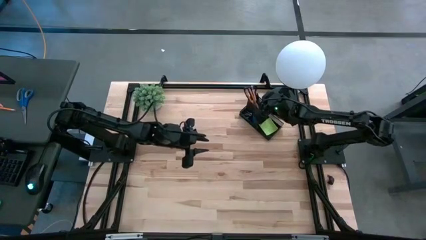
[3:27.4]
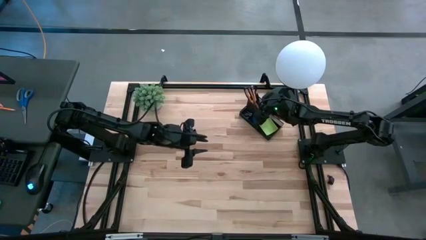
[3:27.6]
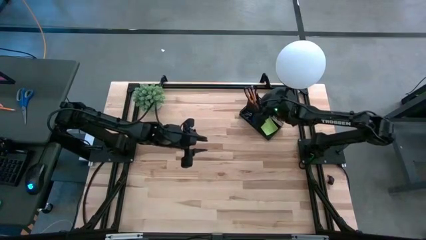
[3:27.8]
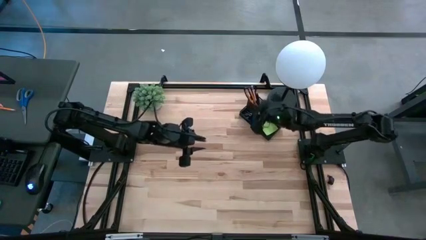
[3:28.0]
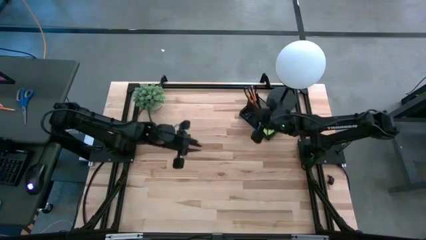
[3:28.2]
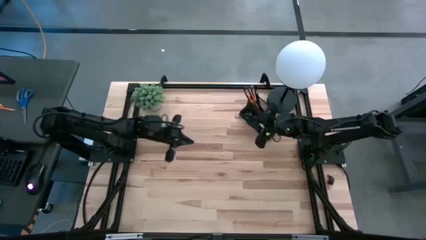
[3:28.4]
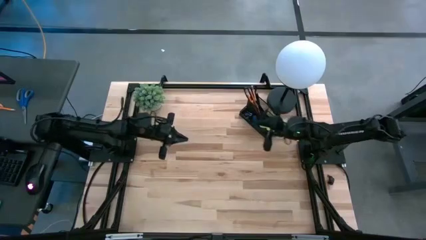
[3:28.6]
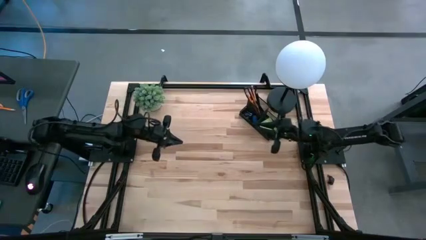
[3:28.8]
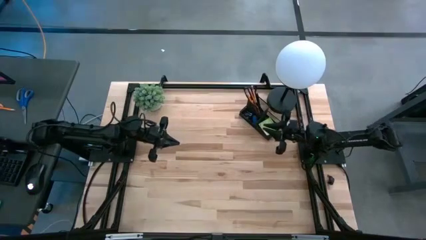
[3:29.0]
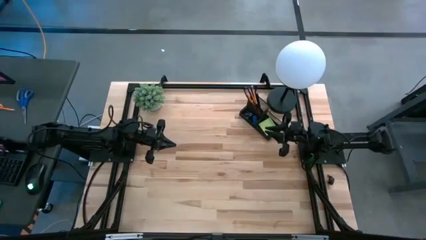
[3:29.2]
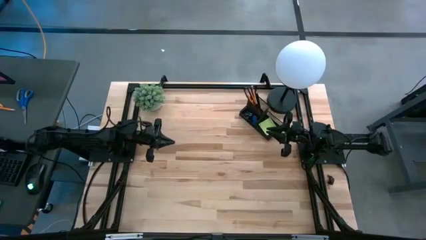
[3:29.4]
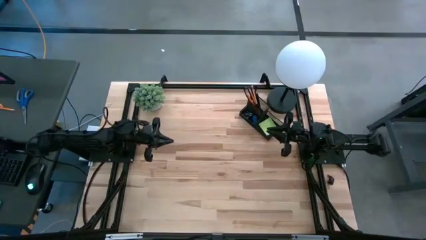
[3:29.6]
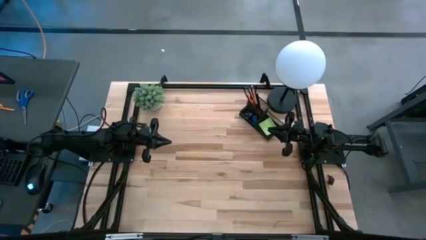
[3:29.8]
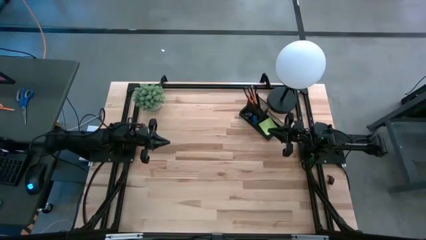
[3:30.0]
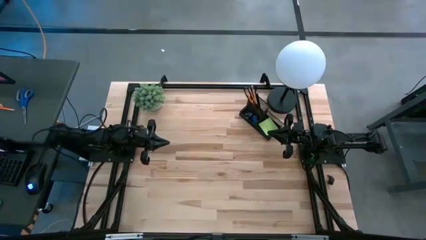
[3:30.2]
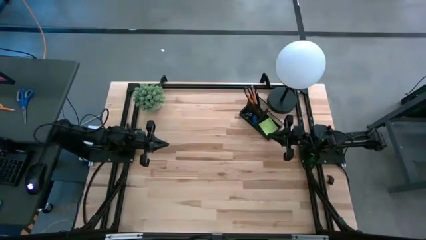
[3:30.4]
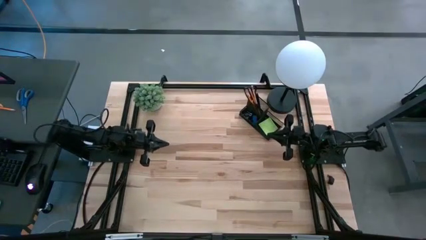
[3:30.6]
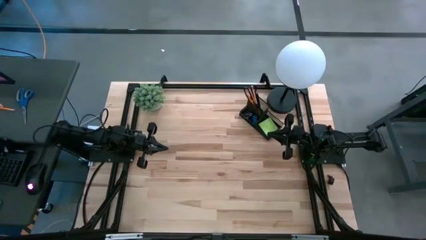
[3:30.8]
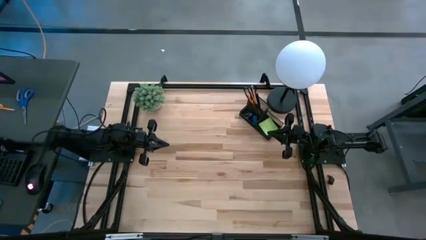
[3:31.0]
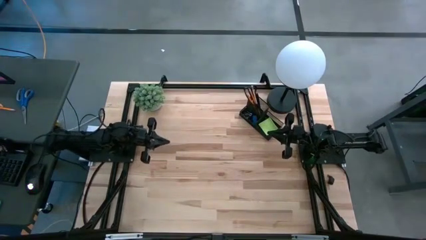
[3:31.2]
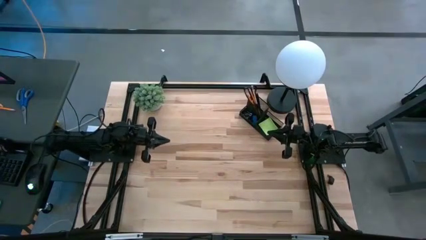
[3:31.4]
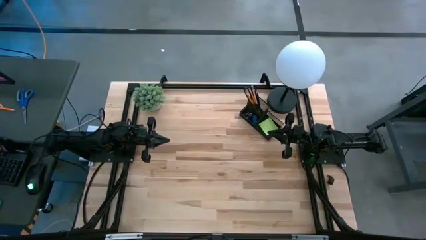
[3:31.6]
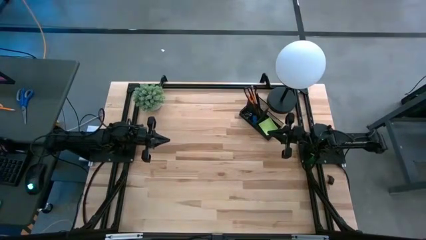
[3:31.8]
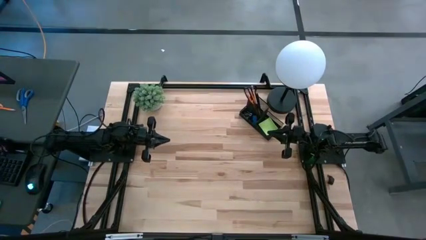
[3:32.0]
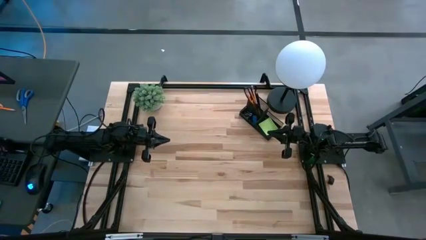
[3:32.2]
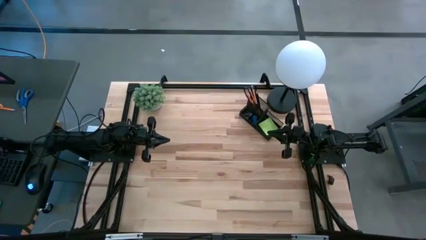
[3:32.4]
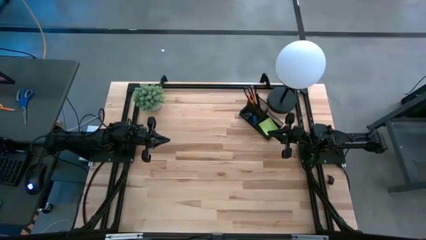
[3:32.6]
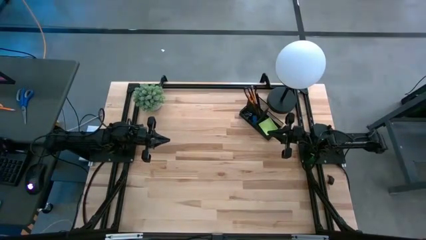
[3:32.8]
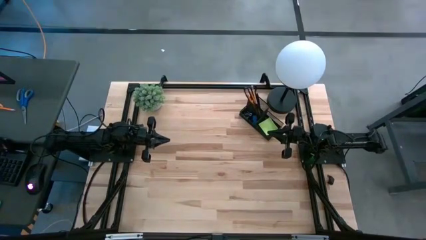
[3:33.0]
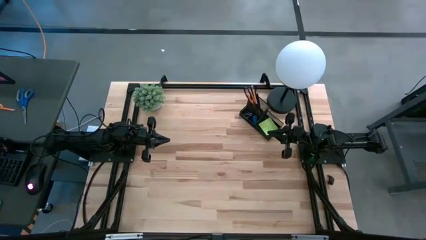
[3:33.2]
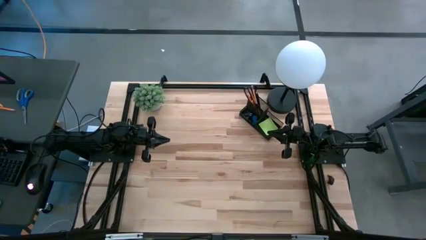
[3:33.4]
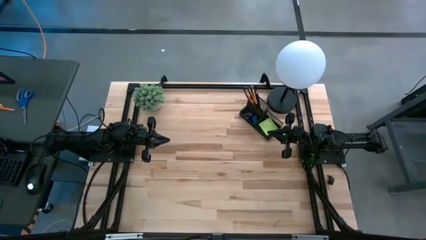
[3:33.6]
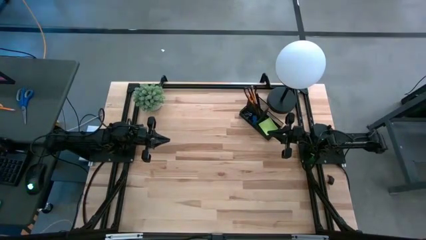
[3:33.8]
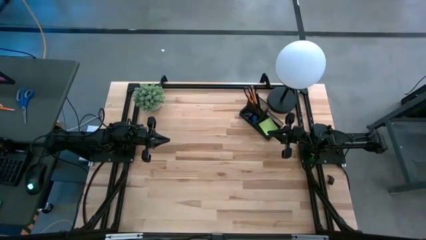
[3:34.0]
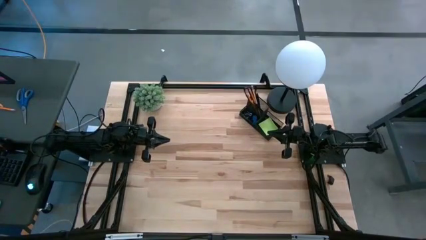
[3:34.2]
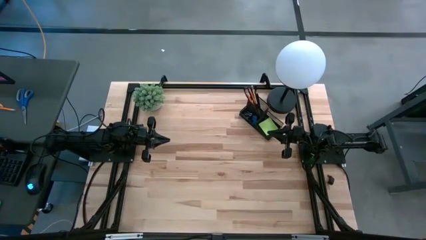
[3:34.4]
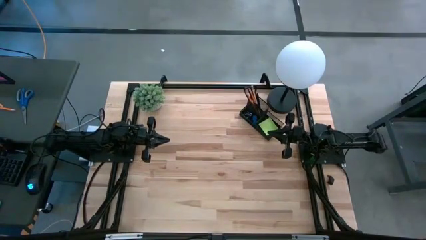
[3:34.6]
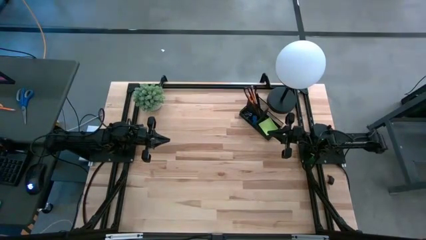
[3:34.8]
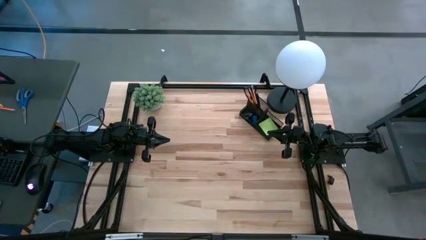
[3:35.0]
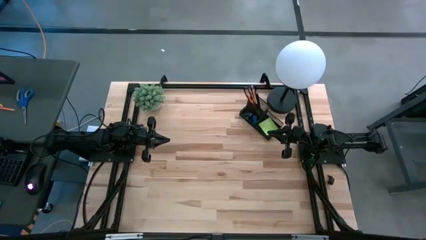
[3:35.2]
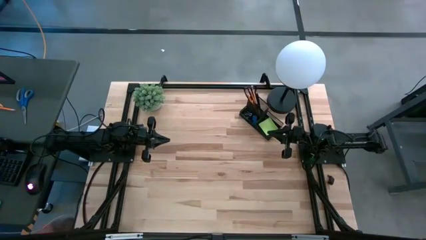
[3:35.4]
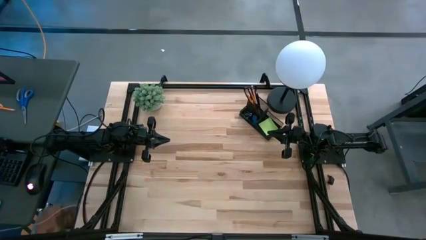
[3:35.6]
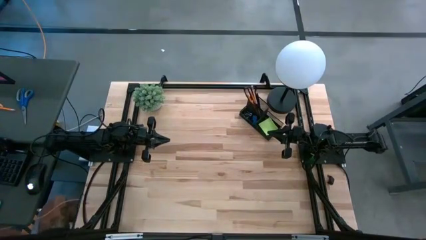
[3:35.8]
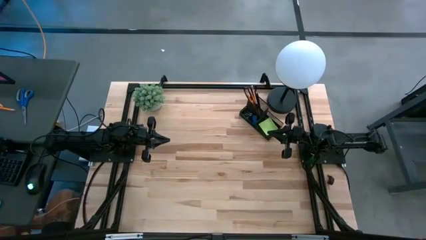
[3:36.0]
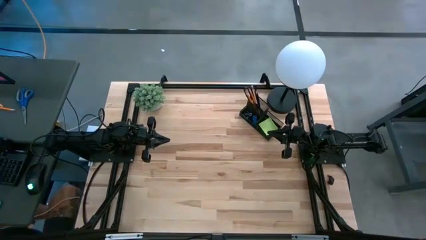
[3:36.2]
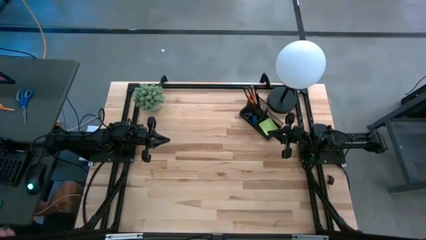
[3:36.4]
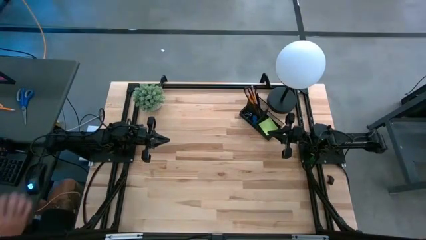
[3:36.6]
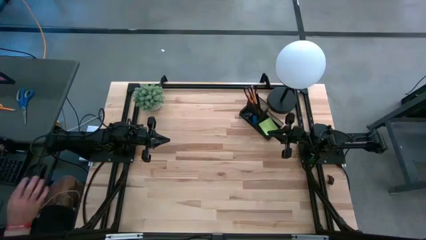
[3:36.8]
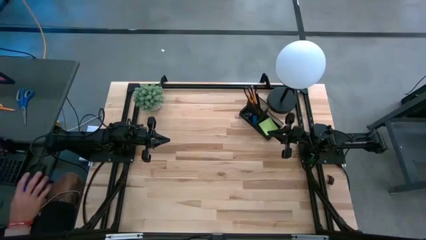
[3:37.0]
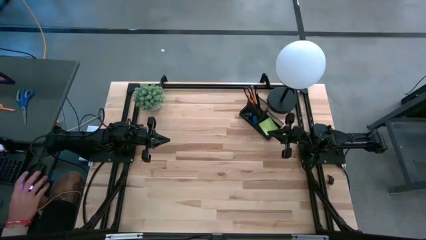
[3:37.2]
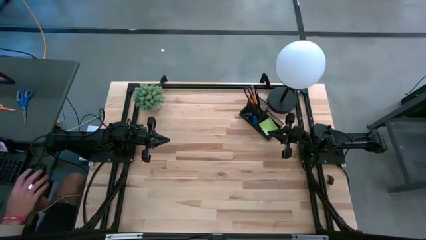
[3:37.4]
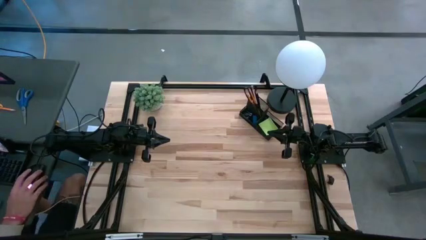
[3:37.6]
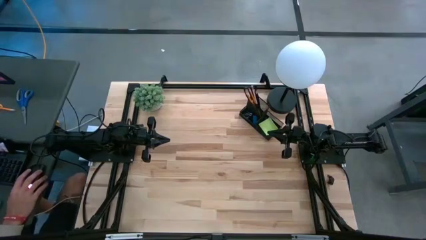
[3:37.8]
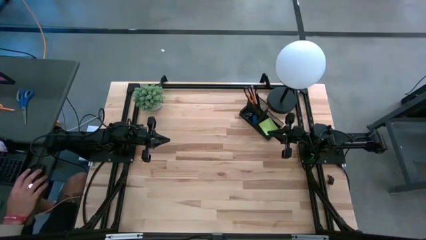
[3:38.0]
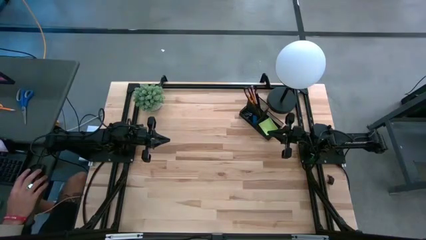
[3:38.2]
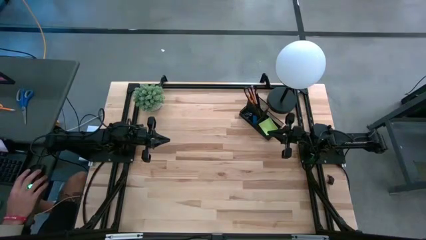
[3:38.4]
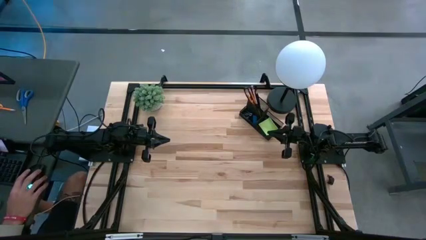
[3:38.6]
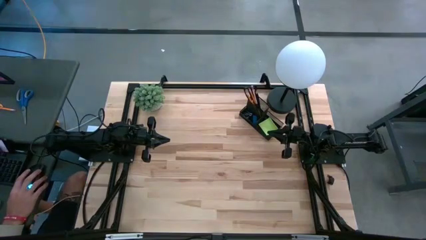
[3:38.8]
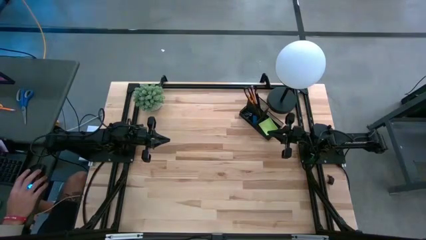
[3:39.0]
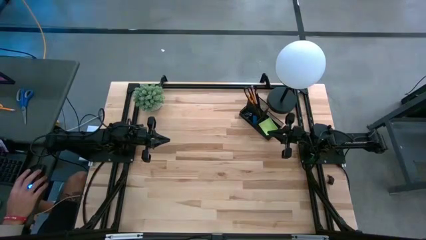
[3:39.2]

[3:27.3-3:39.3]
Task: Pick and place office supplies into organizer
Return to Home Position

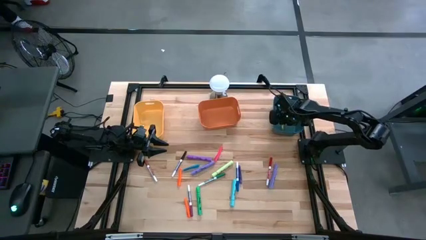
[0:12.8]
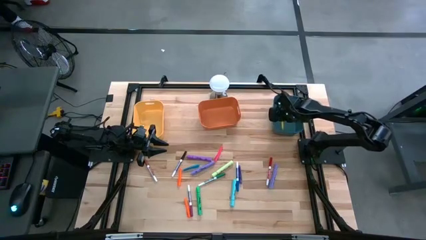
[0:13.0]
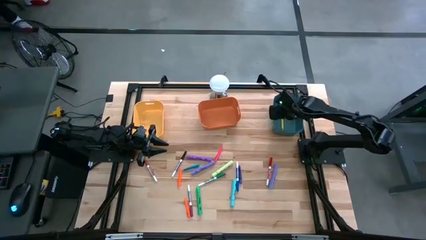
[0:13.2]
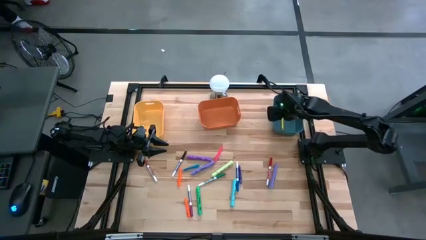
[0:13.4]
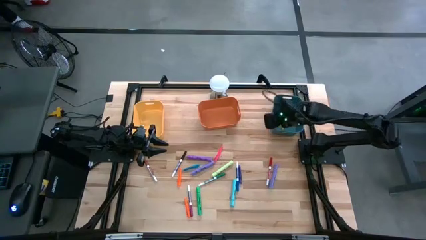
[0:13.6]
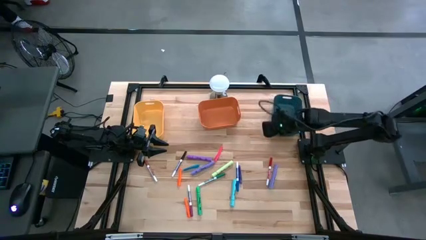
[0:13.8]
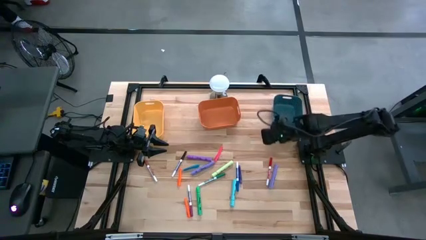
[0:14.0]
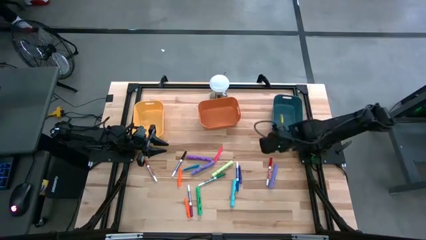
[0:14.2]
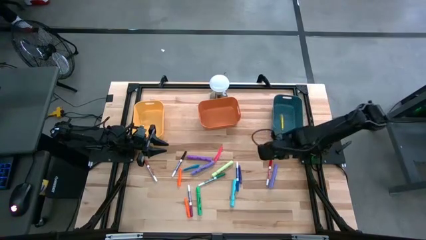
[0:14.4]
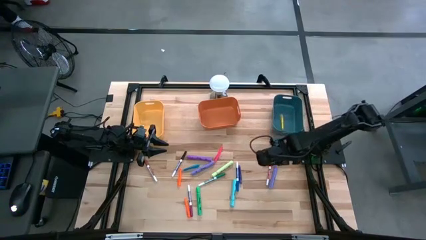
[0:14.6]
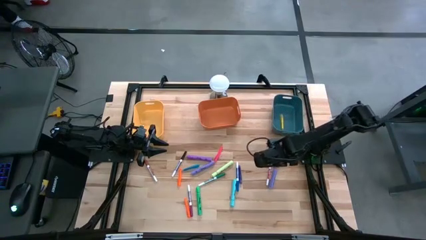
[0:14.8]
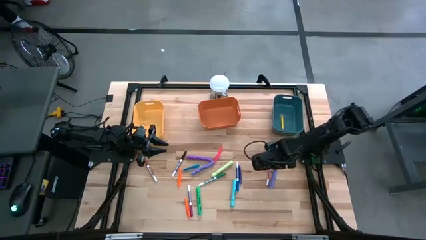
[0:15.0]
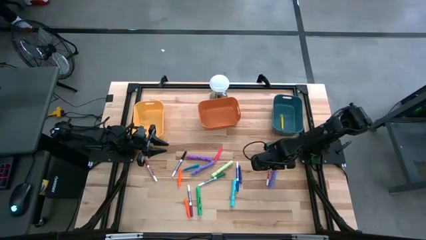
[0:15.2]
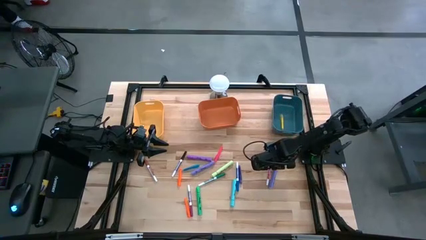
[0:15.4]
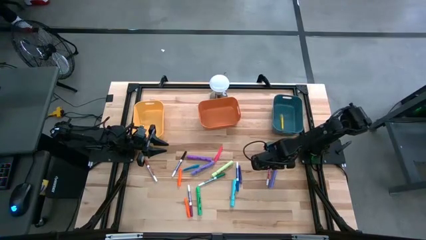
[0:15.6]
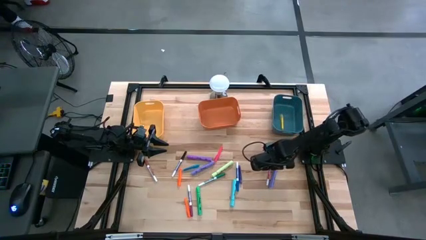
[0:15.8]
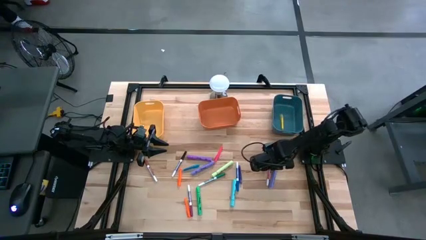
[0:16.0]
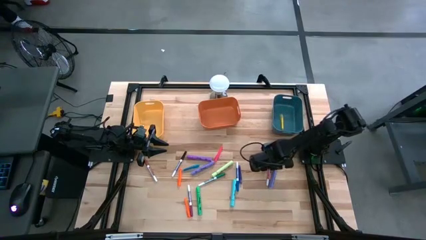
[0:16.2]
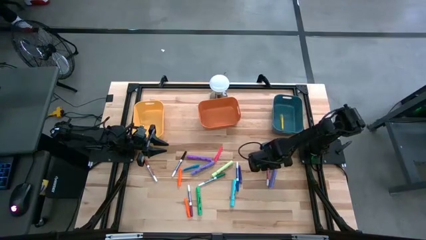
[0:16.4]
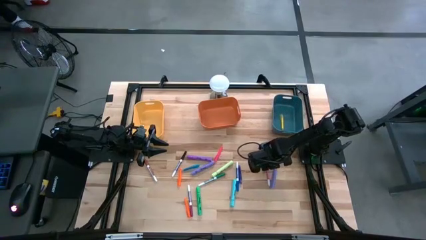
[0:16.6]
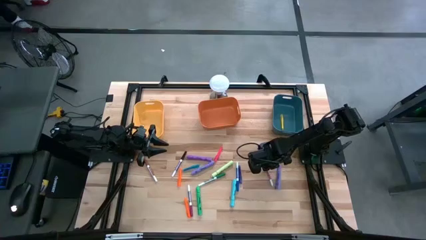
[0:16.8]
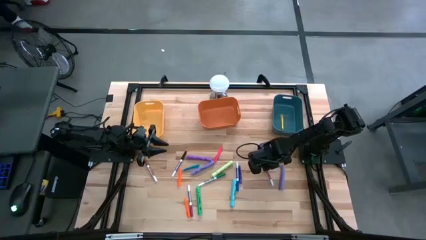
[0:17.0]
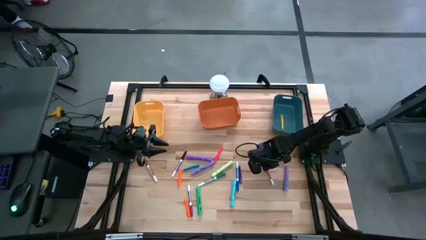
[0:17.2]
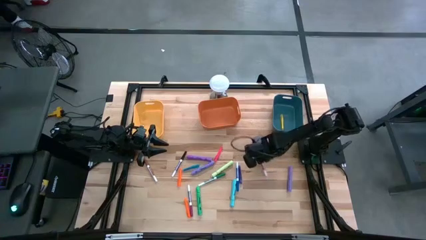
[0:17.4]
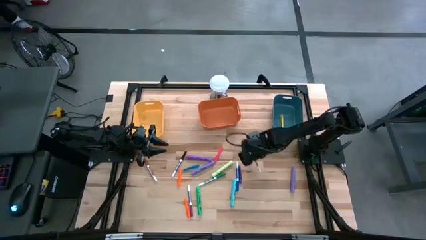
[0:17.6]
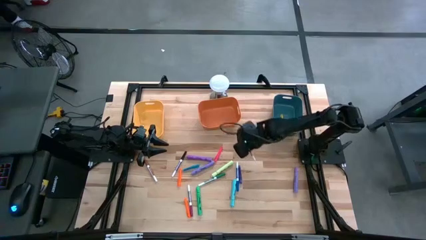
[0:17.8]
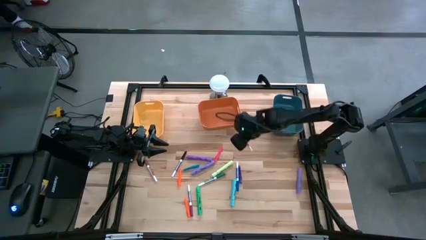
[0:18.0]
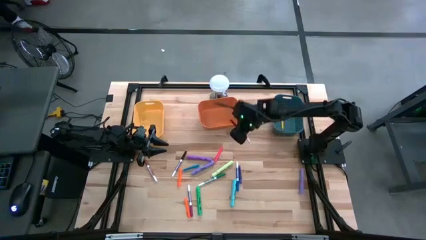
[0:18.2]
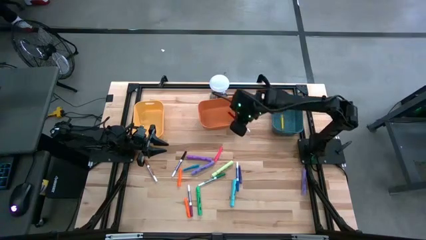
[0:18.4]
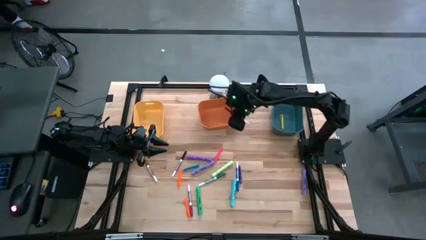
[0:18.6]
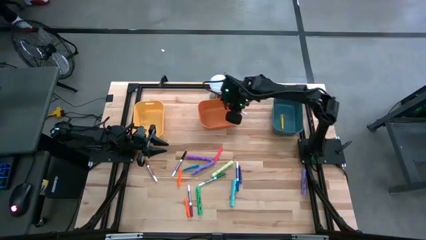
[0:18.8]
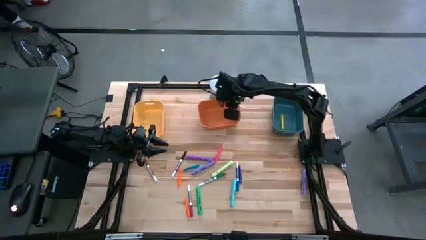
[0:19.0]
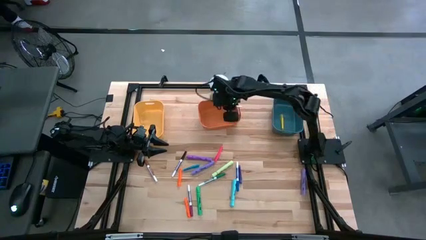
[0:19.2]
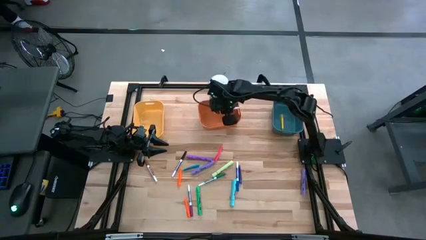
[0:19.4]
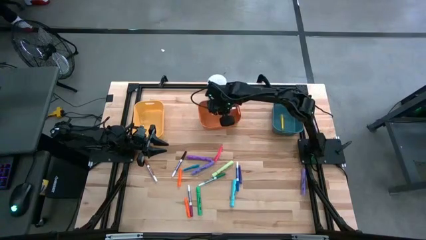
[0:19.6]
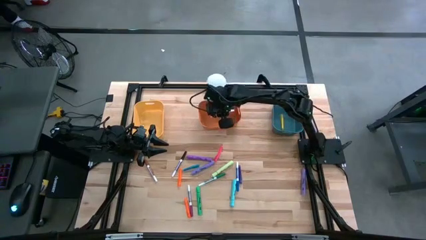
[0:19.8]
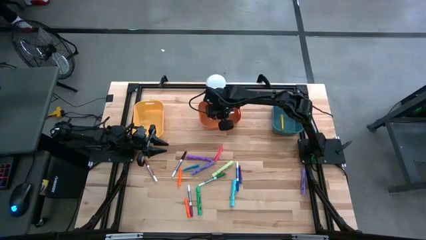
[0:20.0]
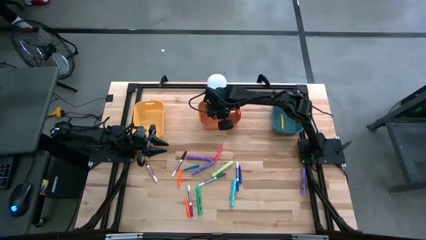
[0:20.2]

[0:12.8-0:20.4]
Task: Pick & Place Markers
Put the red marker pen into the orange bin
